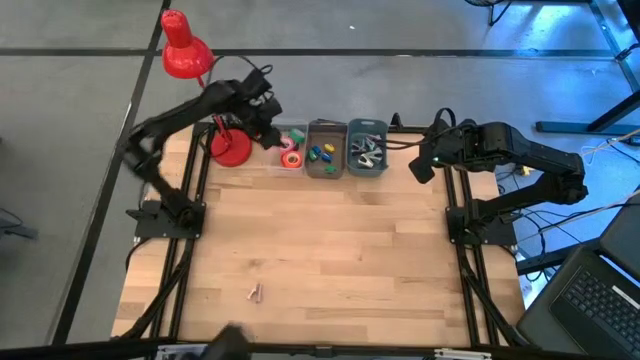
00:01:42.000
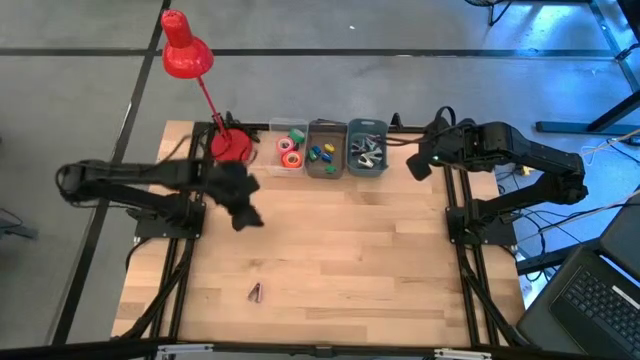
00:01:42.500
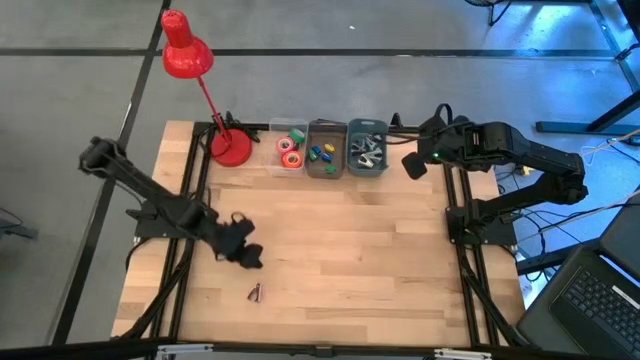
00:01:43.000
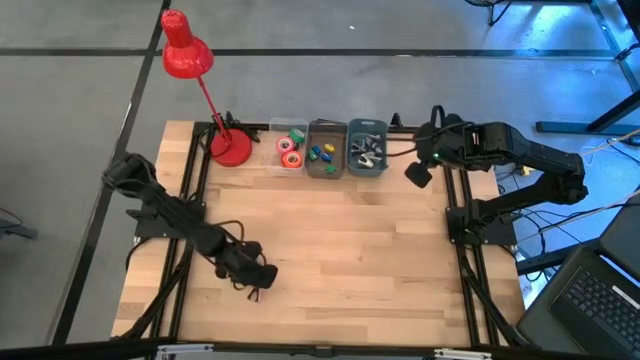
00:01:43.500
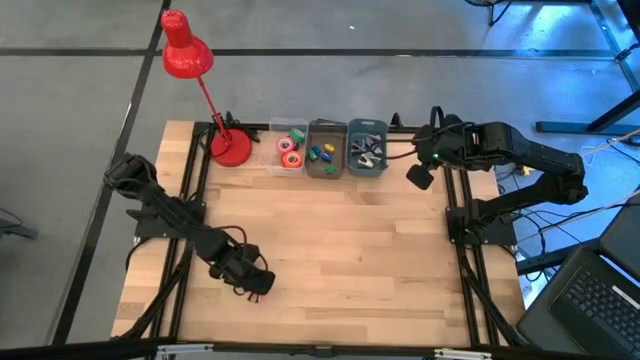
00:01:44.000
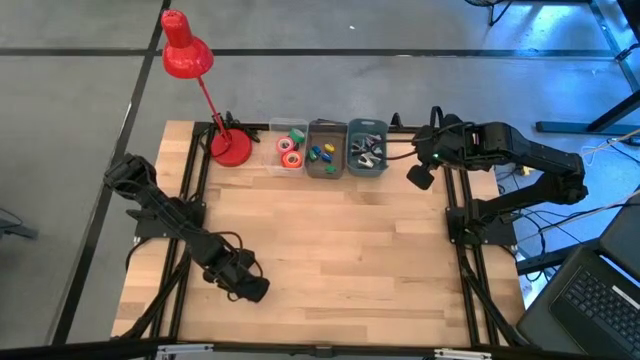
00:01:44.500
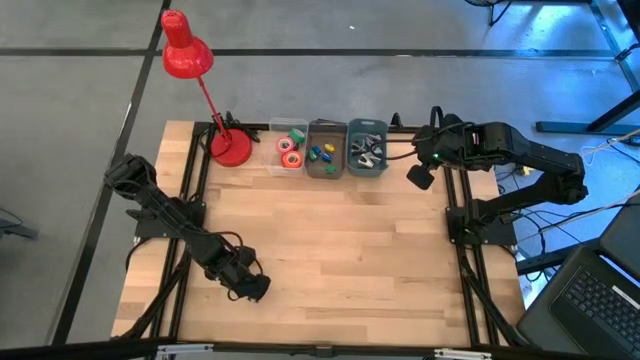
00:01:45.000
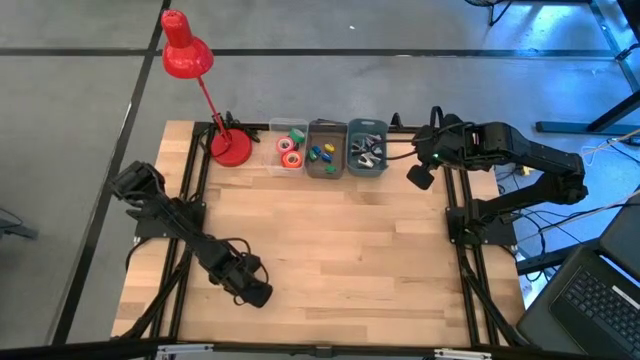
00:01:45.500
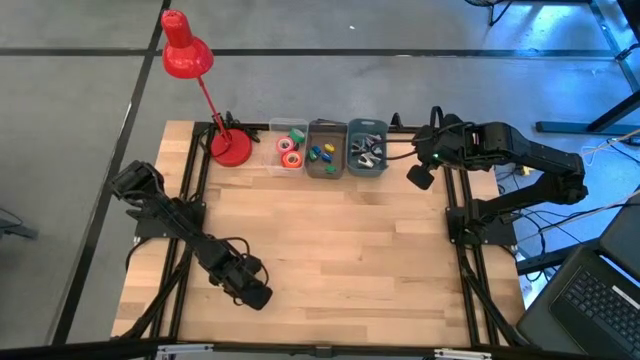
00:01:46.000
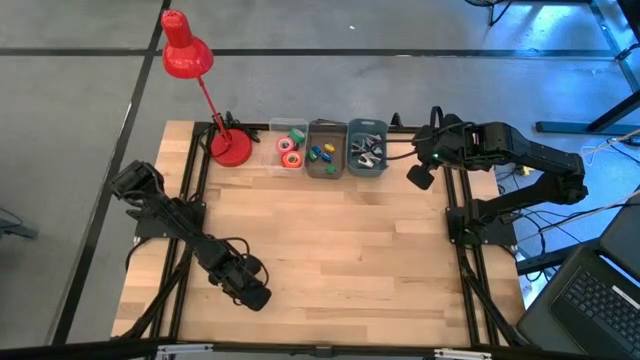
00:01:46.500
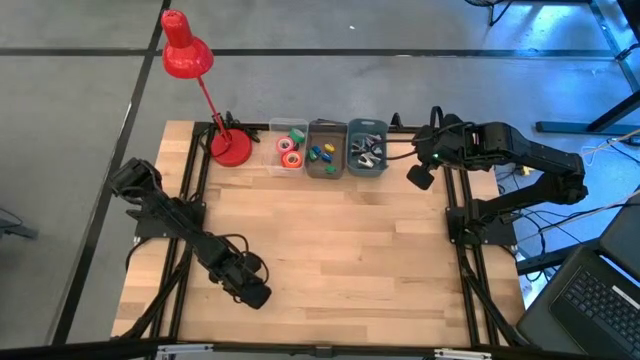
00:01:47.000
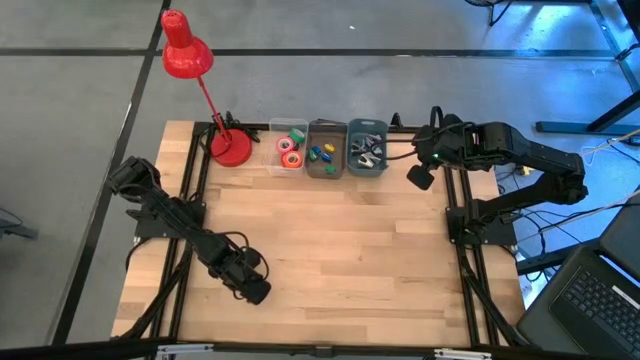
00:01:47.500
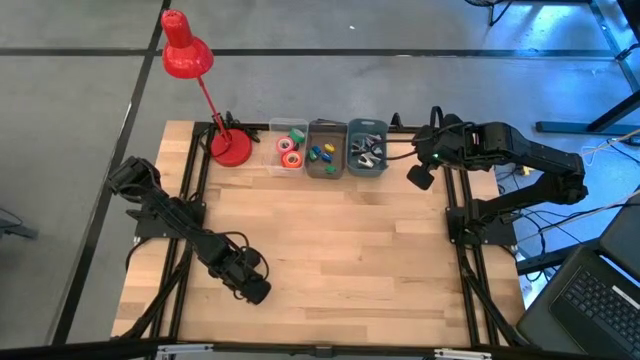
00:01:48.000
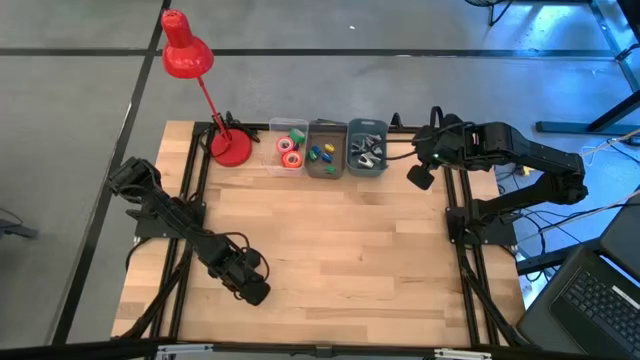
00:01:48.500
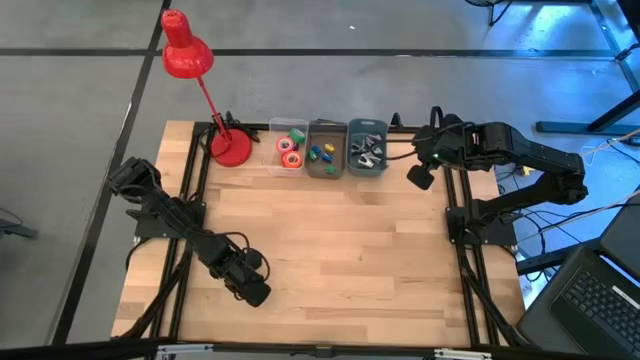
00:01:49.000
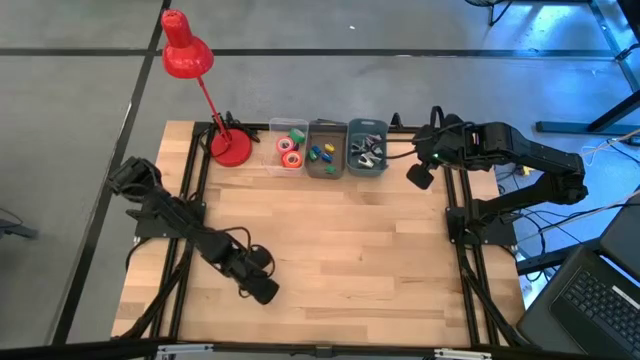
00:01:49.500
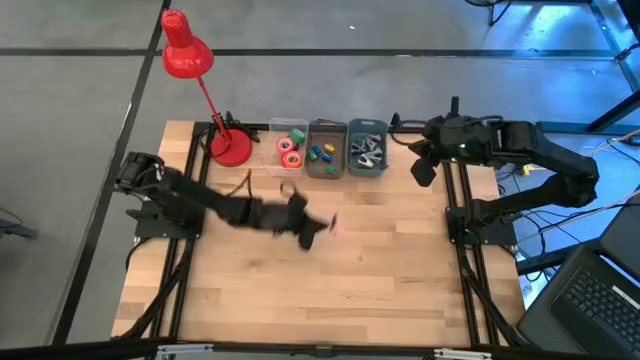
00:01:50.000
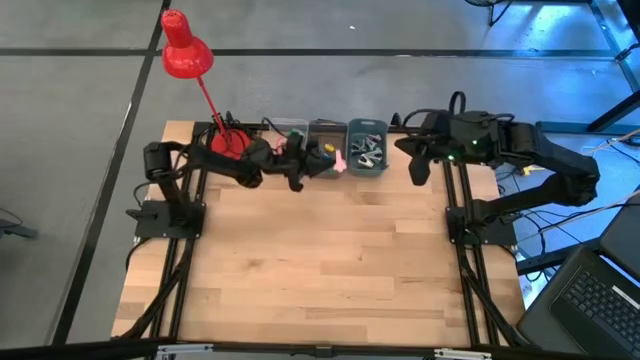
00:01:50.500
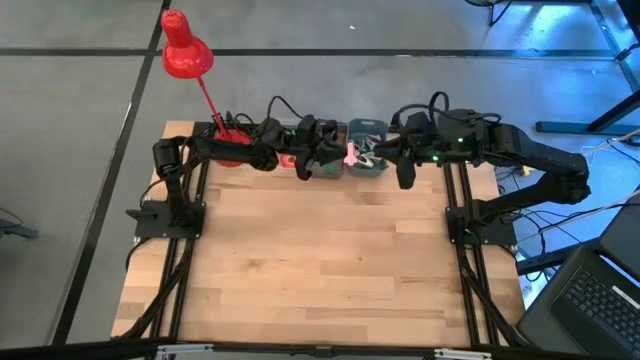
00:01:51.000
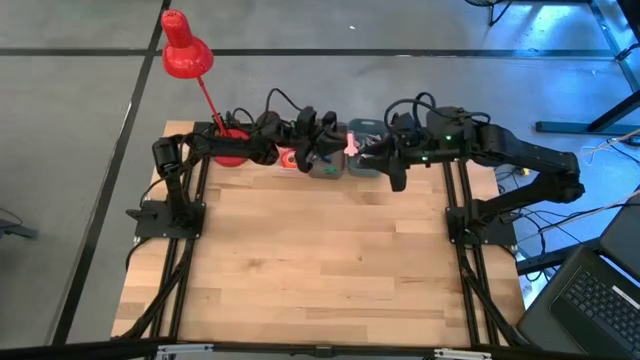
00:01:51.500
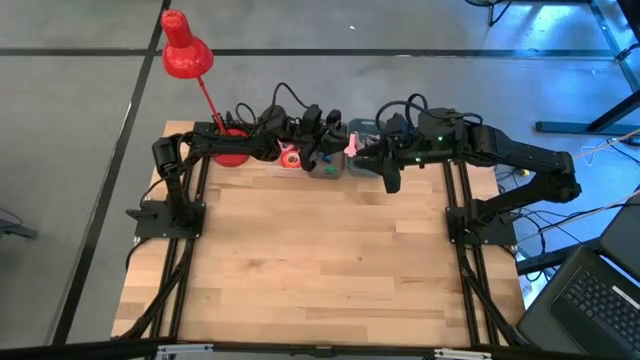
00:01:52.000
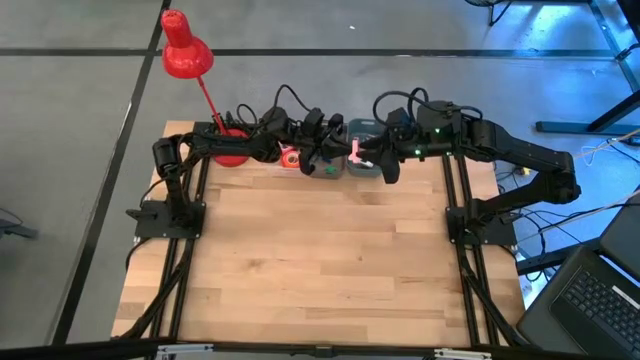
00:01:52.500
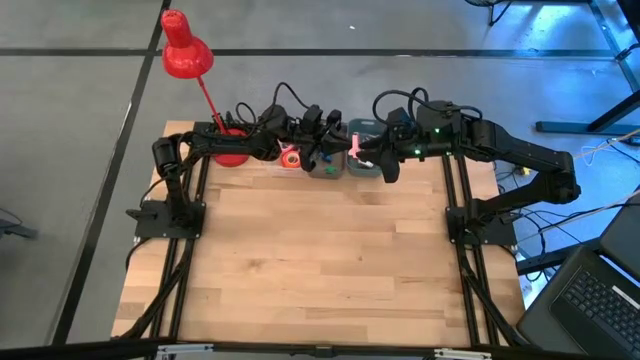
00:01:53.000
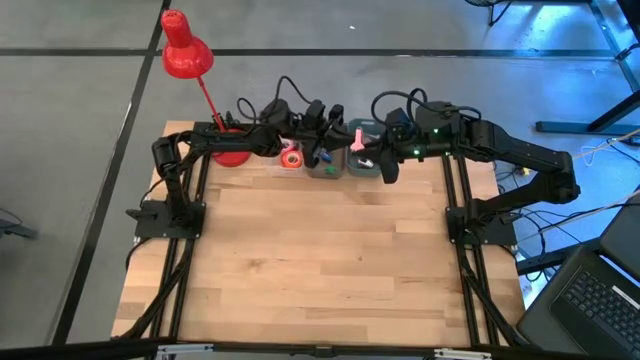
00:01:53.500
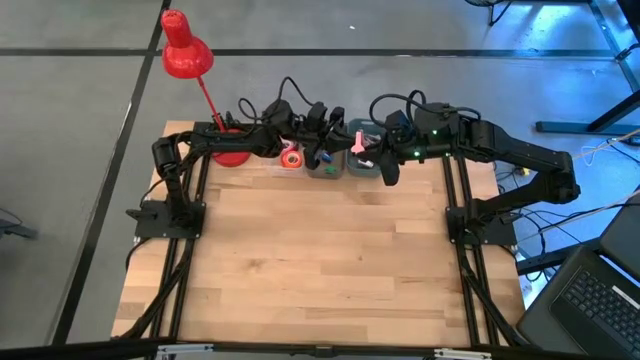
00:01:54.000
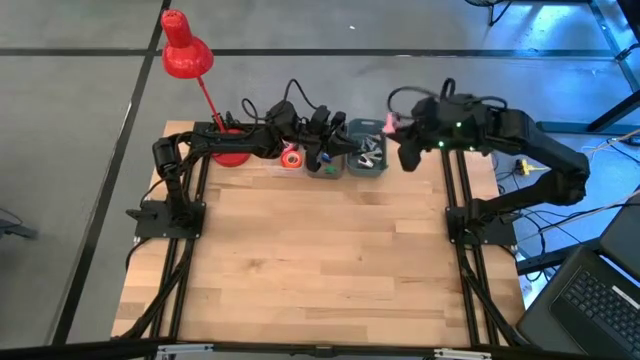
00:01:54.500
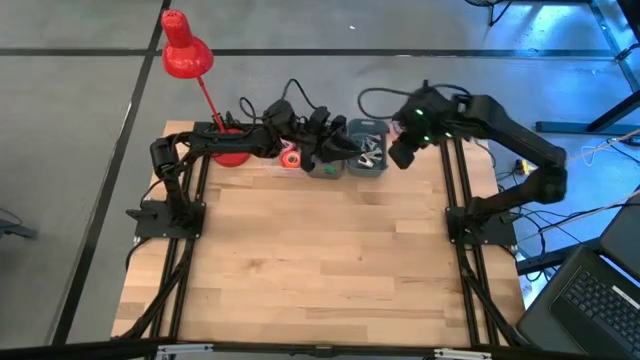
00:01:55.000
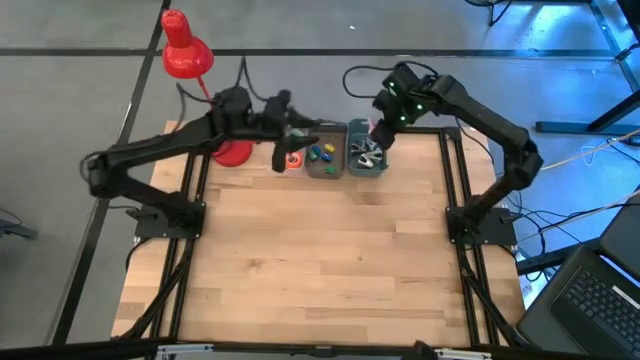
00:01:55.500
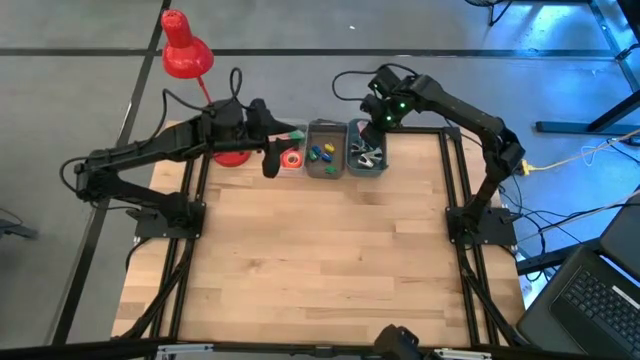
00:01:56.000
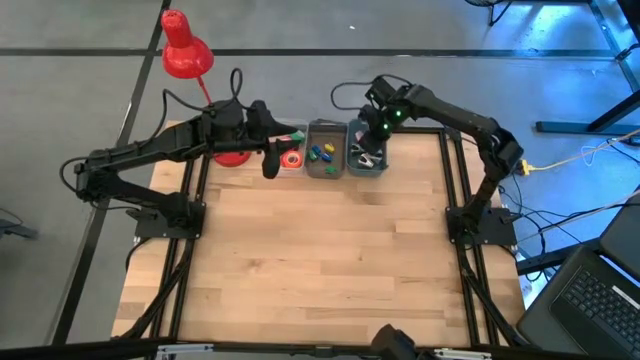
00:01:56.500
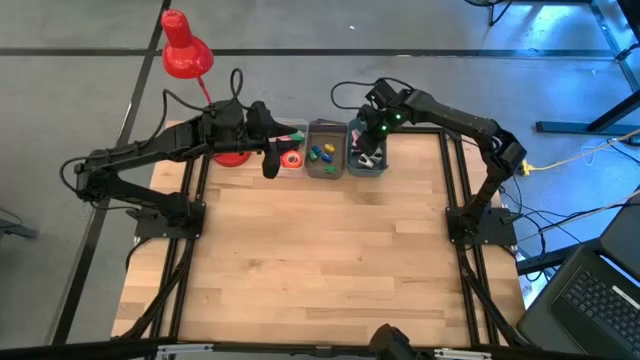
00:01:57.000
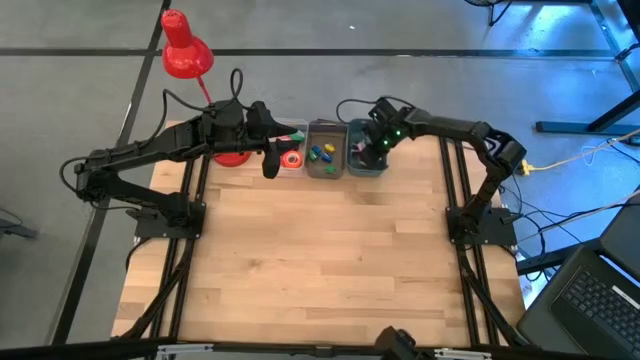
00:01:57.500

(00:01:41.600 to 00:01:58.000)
Task: Pick and place Stapler, Stapler remover, tape
Put the pink staple remover into the blue bin

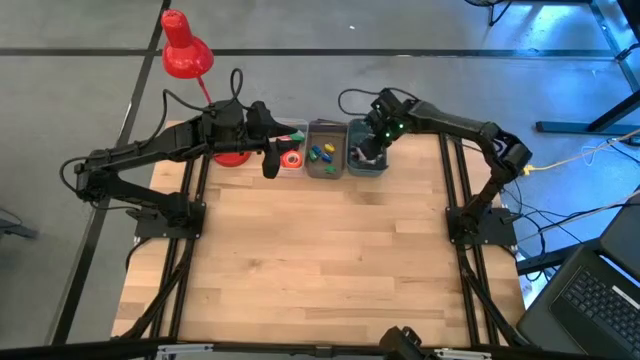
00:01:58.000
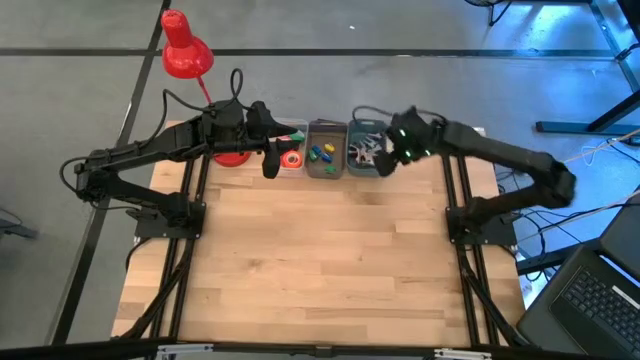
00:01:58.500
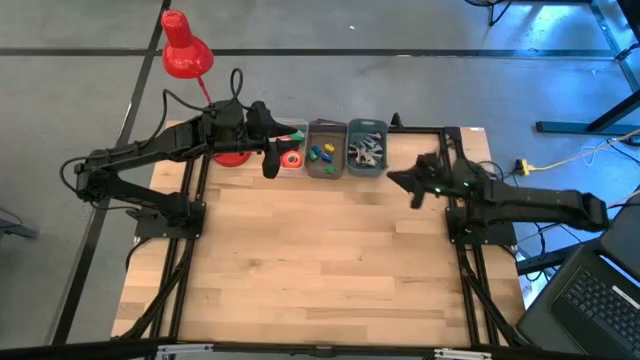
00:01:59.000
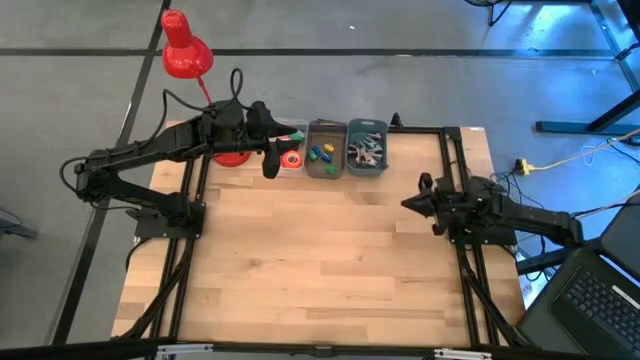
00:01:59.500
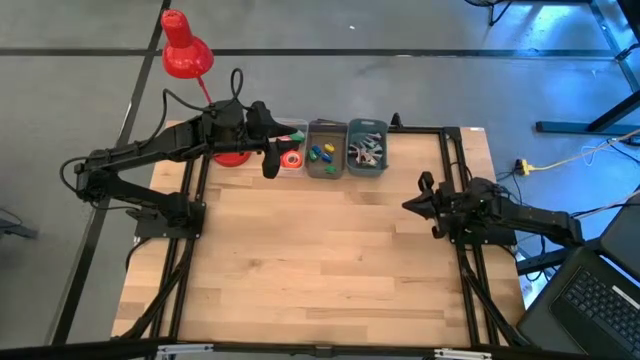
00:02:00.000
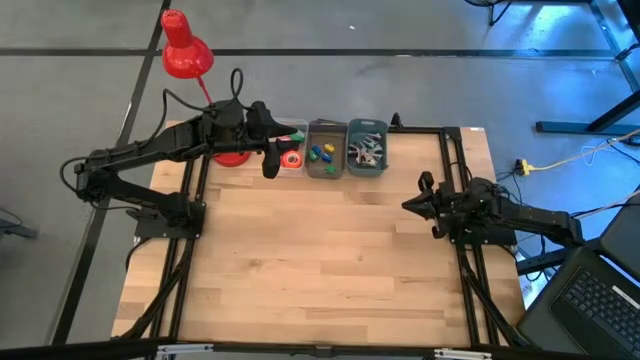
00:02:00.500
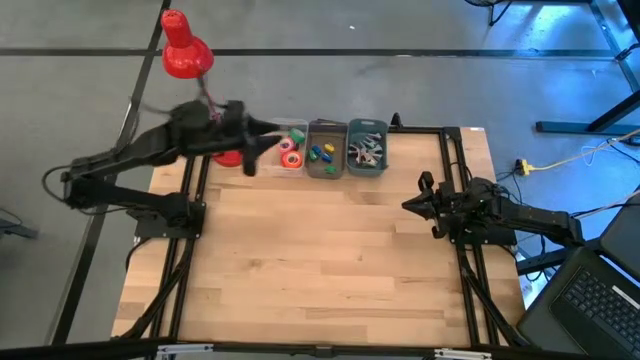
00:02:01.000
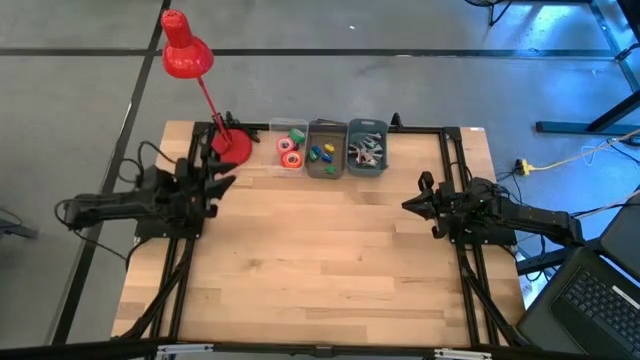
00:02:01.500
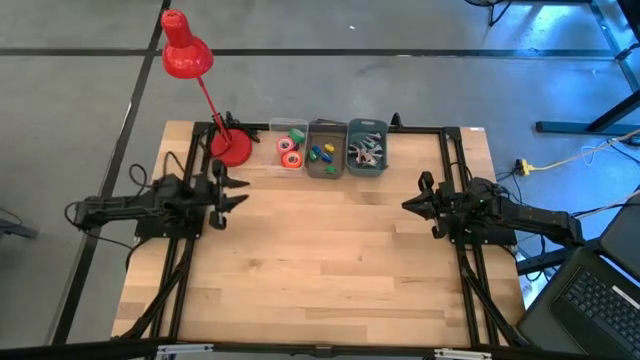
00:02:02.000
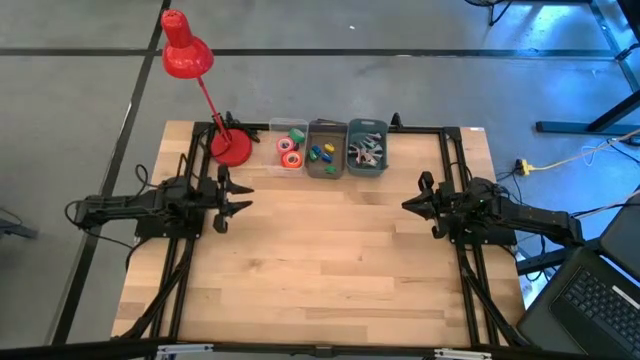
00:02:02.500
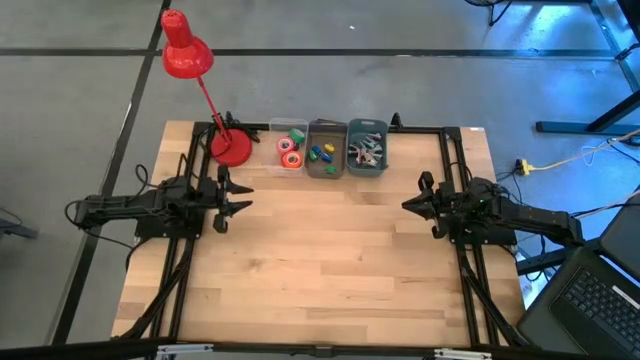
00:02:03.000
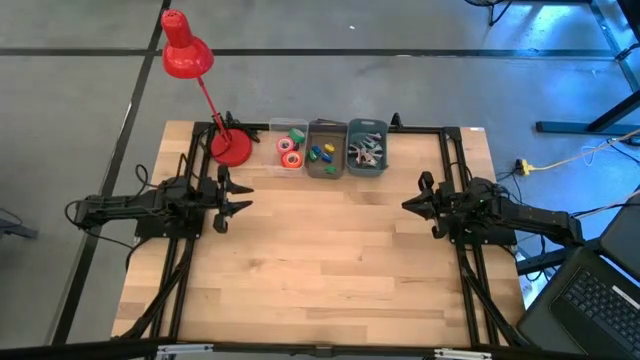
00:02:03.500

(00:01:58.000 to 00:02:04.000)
Return to Home Position
